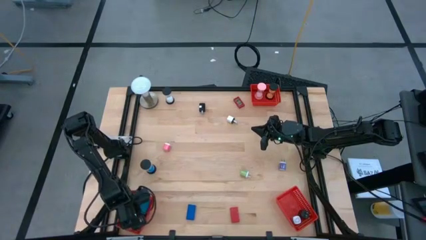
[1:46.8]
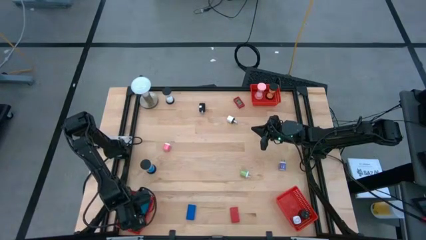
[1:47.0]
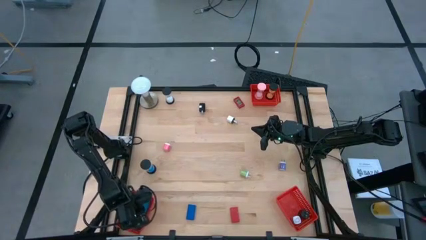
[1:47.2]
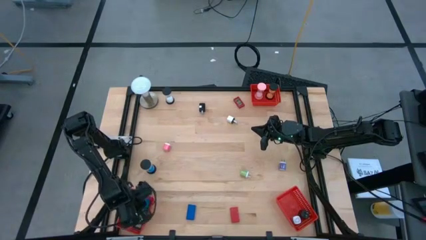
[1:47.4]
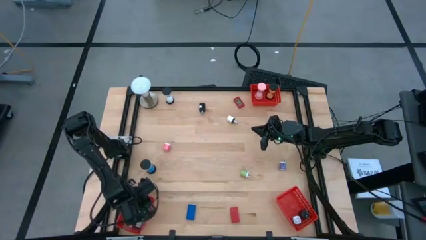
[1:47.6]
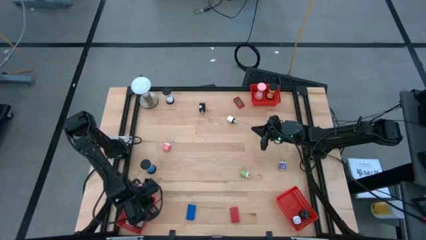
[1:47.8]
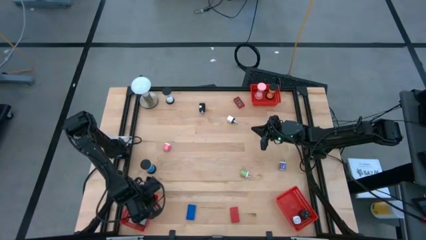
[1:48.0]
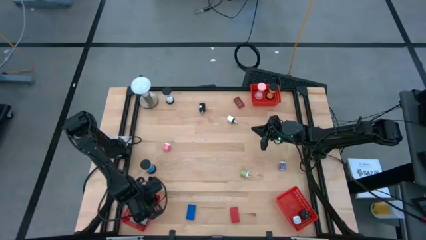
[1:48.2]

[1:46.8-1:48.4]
Task: Pick & Place Office items
Adjust the bottom left red basket

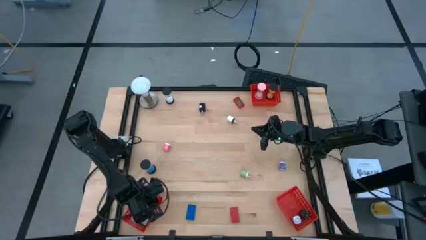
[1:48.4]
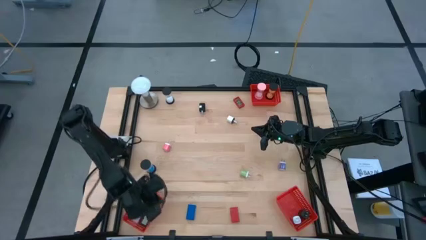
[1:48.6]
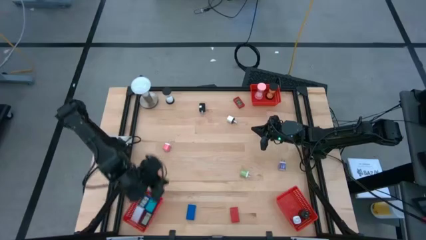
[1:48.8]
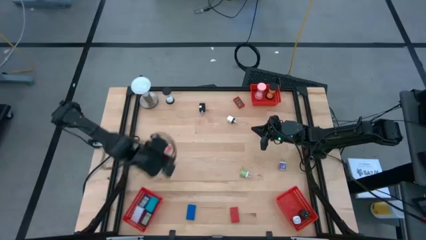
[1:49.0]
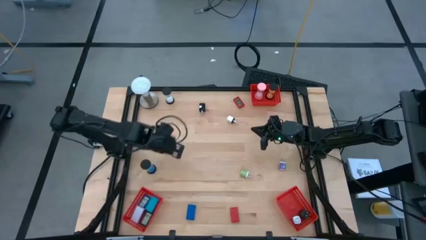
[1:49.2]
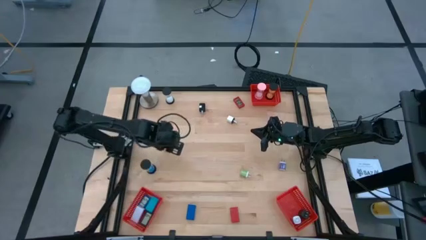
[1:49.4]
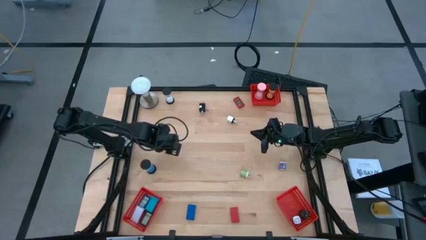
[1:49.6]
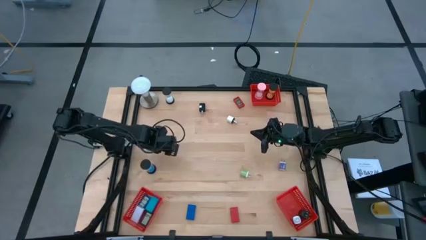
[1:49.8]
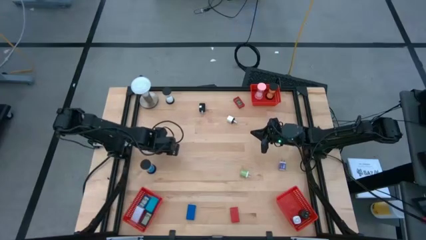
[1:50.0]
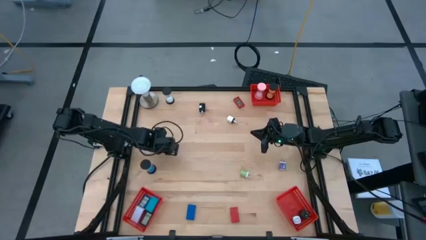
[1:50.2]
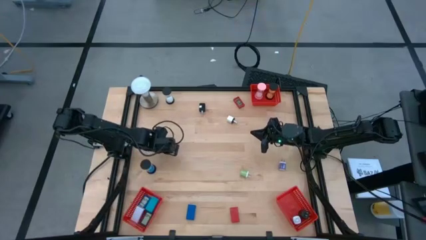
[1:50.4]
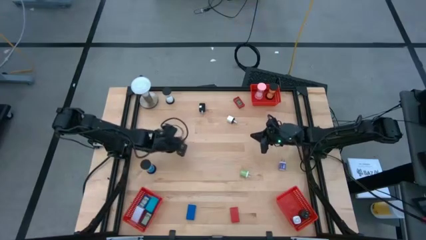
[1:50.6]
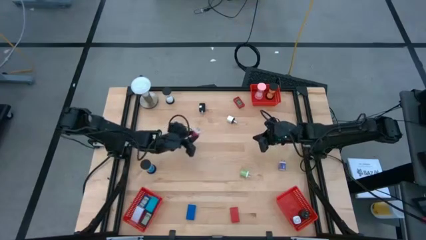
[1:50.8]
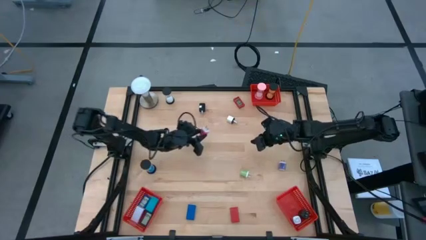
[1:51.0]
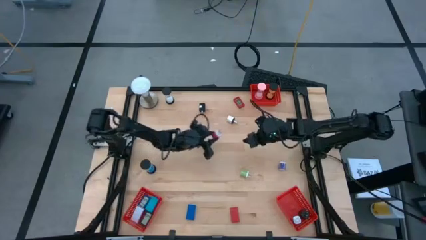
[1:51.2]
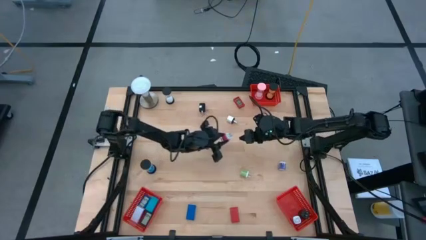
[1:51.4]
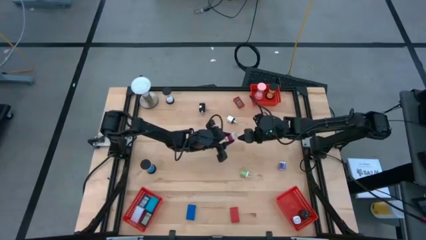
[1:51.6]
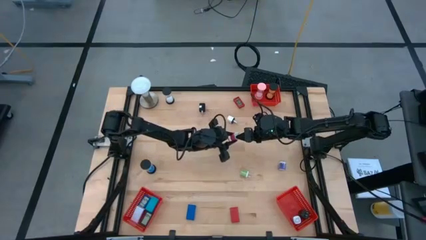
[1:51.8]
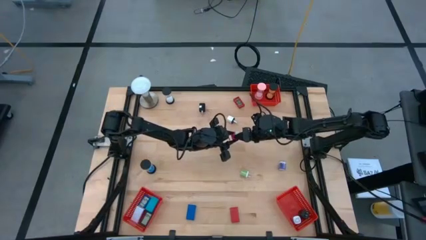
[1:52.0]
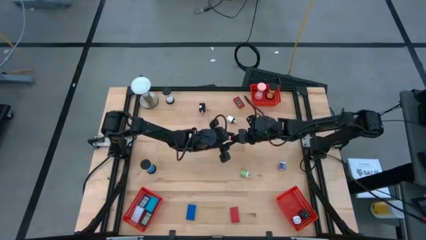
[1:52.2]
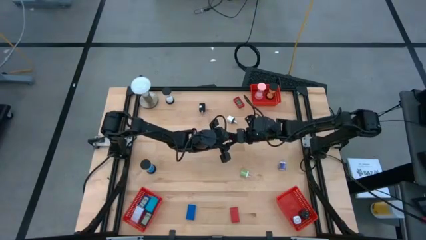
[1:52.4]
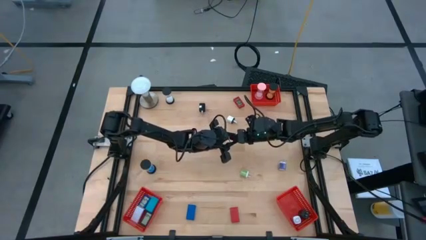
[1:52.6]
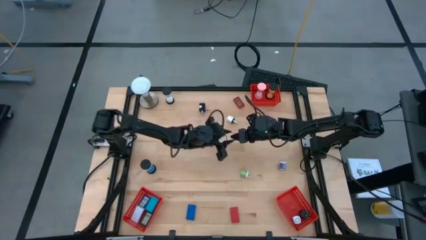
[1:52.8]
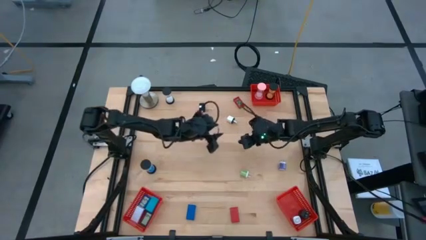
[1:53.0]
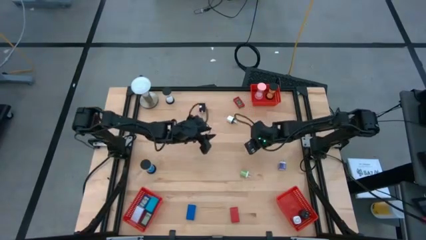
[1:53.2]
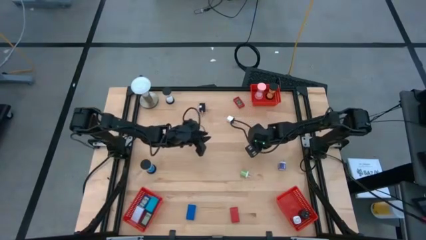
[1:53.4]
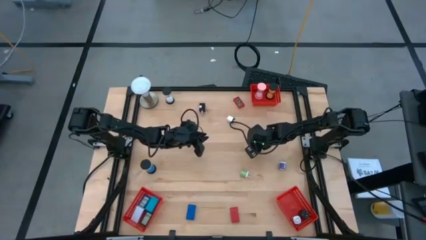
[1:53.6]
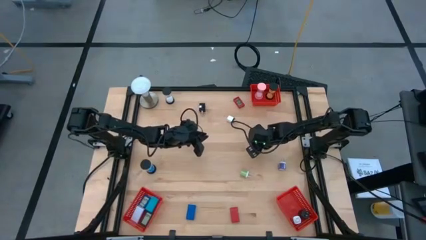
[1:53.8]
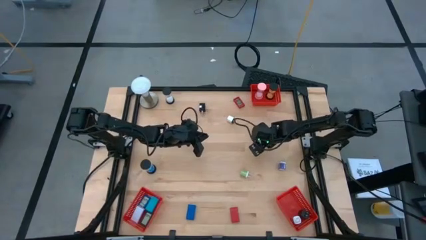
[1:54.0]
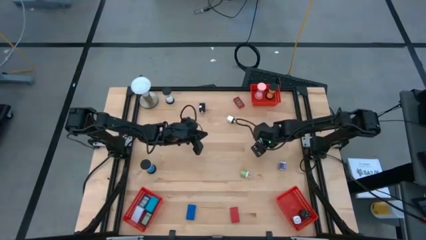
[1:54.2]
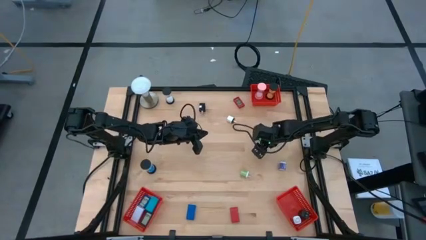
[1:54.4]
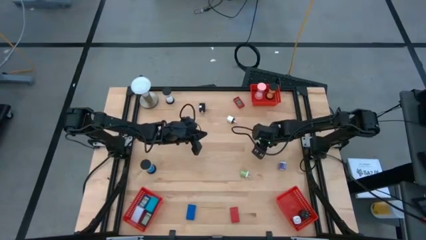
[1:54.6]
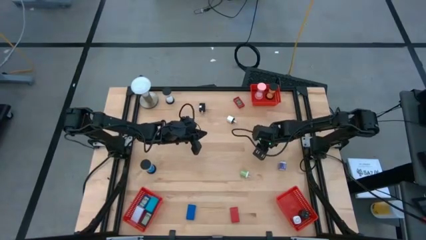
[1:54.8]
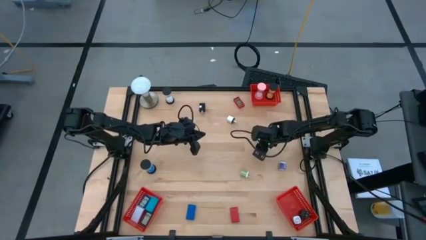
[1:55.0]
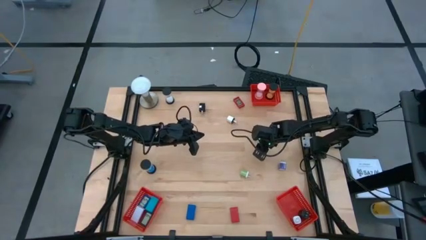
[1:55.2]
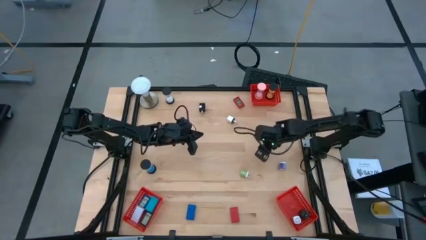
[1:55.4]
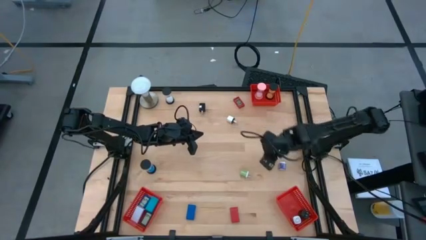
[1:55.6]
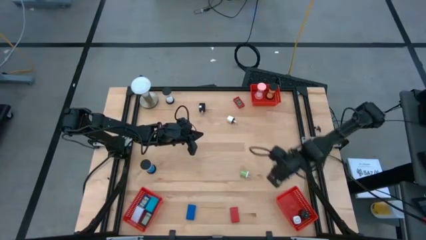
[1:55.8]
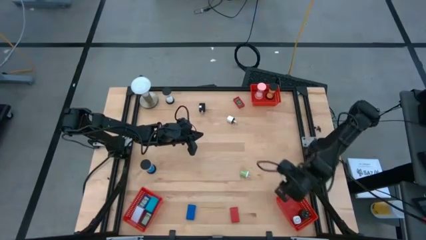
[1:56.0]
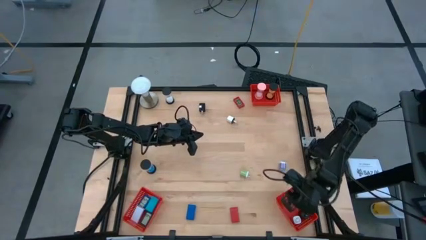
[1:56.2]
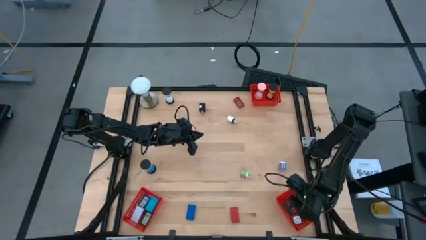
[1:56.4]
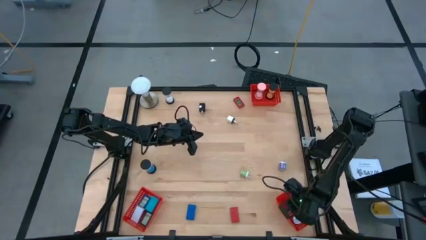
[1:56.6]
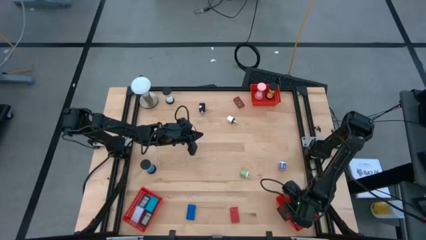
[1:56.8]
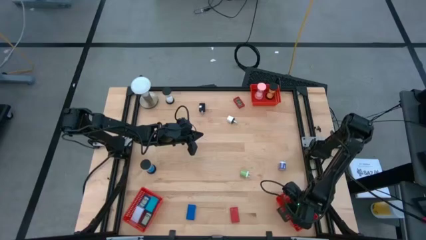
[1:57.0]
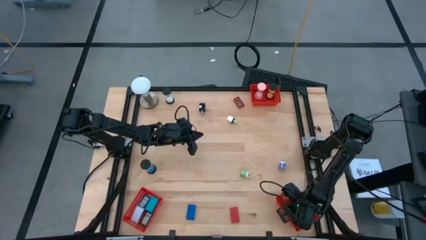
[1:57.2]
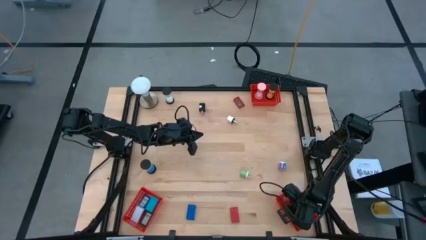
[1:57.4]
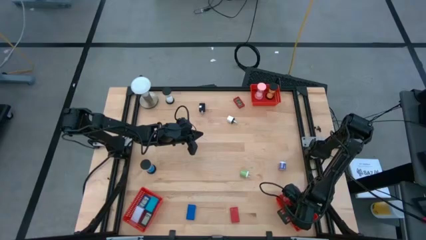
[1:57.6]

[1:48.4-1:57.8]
Put the pink charger adapter into the bottom right red basket

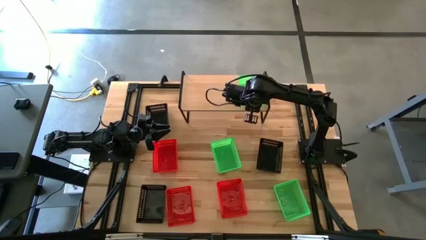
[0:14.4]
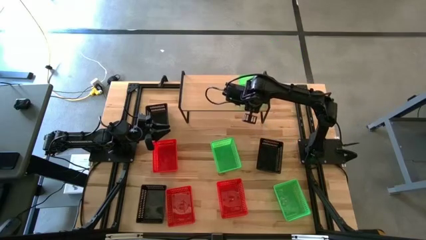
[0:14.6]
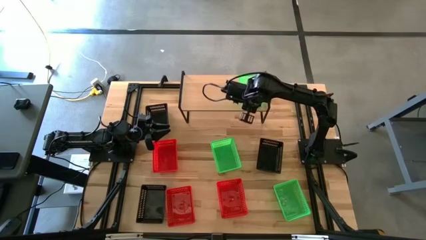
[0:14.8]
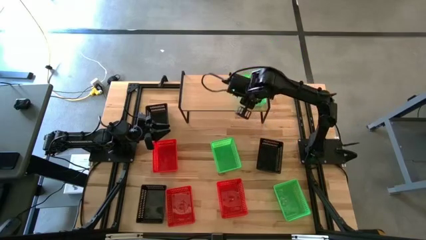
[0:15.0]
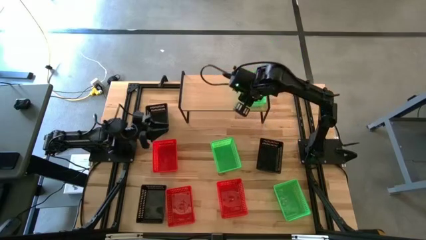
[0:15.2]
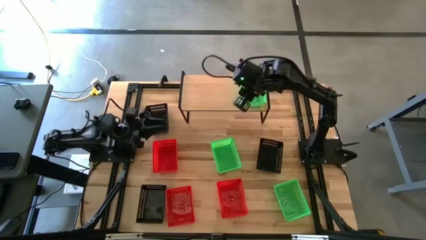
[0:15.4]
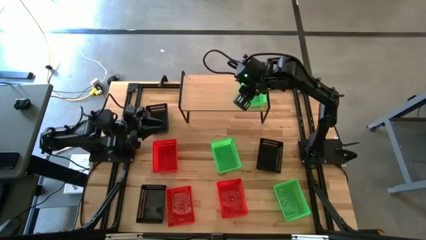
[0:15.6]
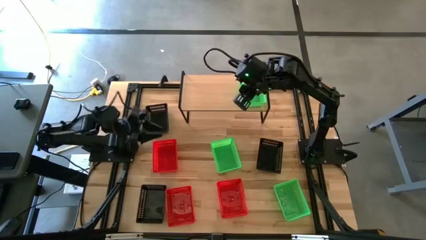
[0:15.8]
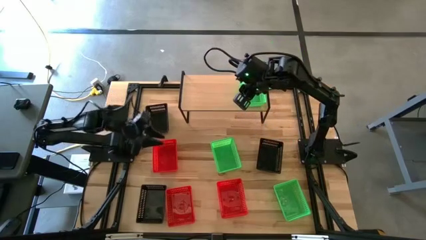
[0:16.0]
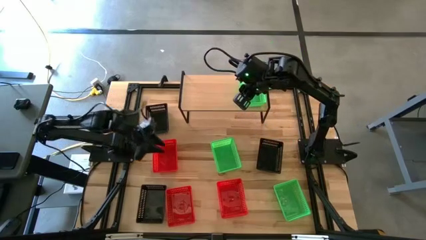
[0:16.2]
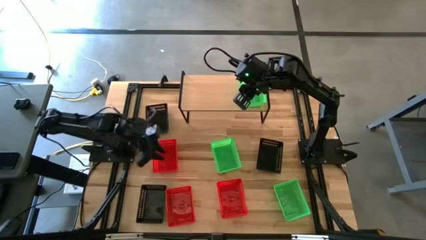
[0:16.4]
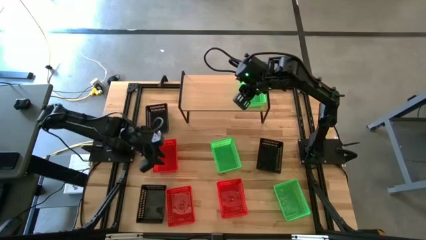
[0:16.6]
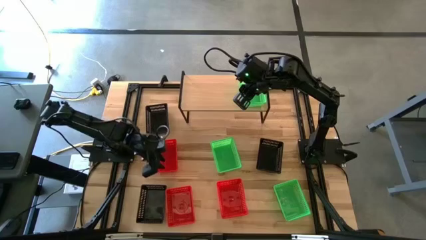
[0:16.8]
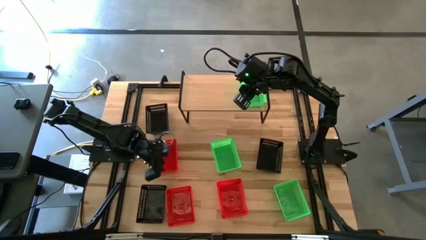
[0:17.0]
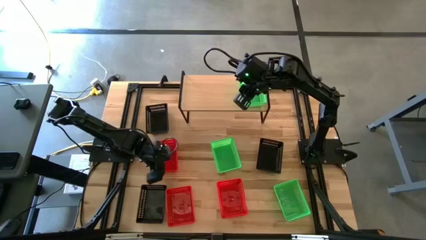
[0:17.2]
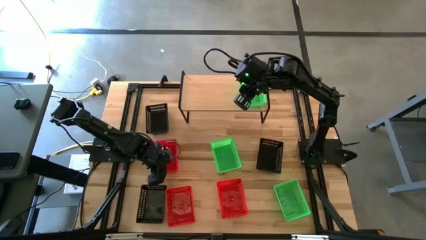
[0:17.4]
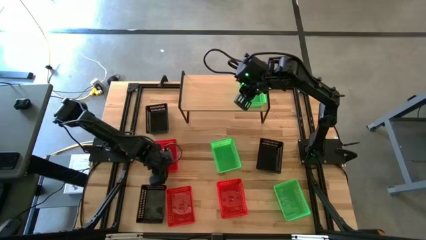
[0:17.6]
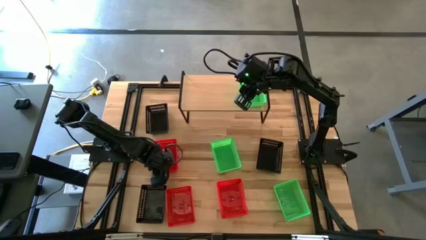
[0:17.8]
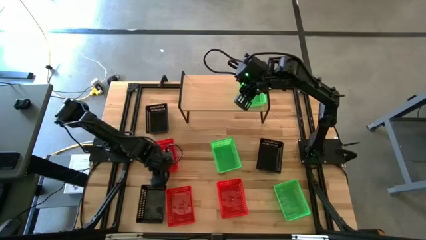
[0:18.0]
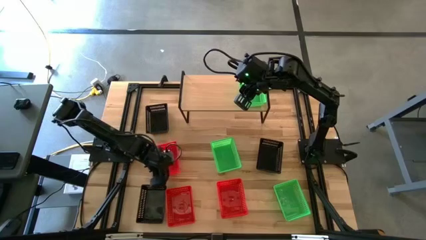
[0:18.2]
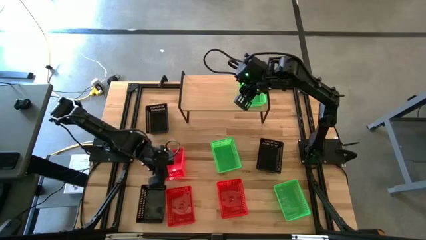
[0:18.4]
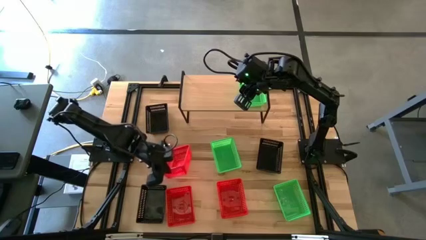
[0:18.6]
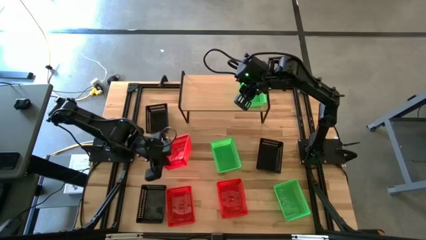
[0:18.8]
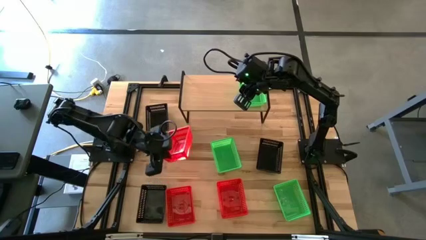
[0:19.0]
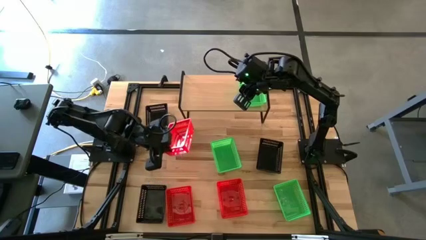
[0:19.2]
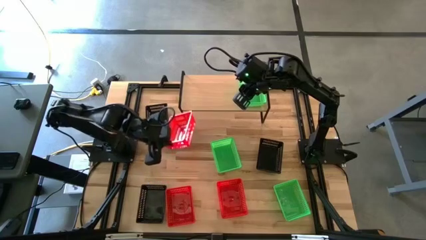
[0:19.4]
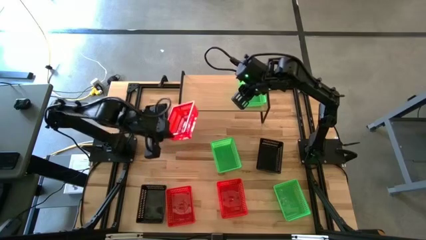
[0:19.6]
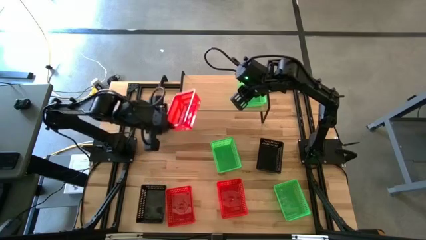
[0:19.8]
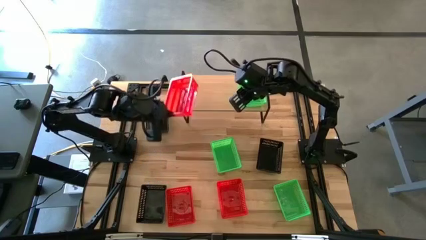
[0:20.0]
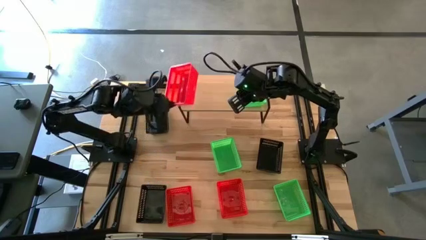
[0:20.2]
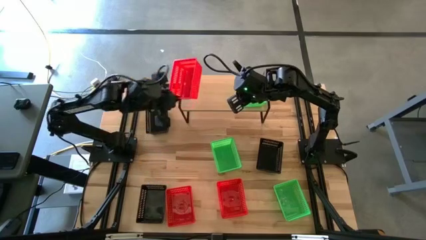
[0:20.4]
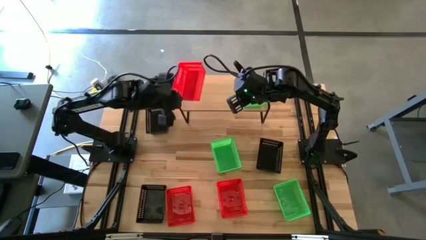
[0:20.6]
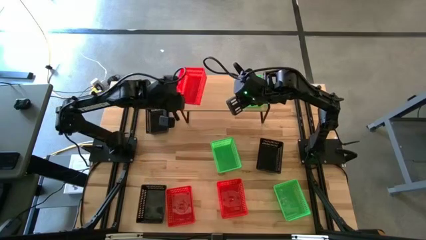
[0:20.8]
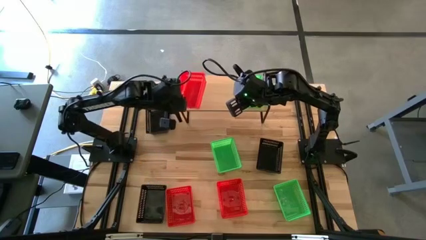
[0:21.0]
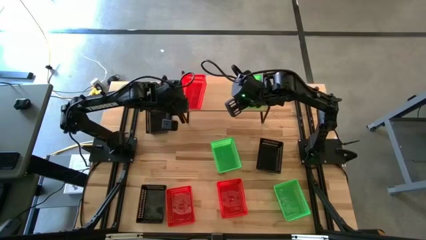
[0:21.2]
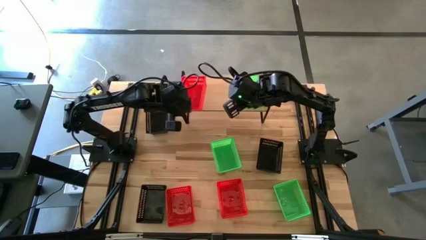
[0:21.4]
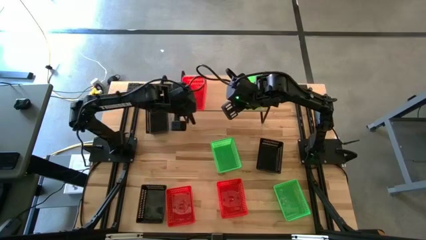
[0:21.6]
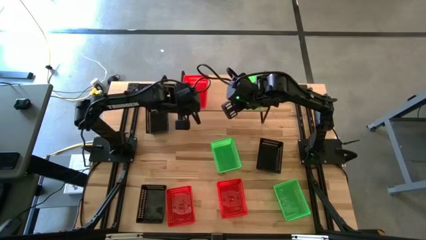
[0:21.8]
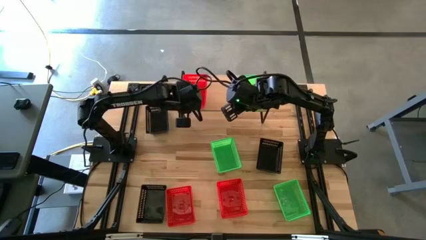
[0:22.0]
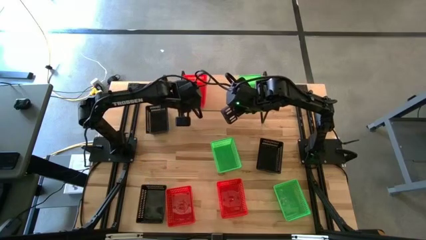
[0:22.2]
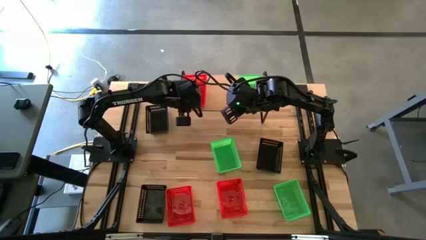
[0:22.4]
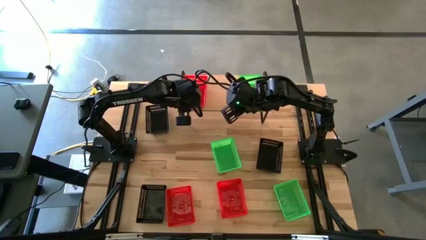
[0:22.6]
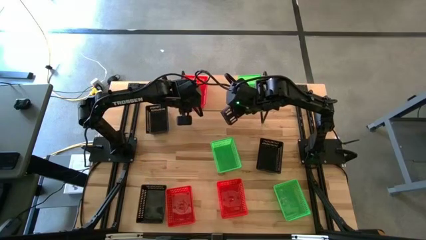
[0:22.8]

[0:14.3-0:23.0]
Task: Stack baskets on shelf by color
Put the top red bin on the shelf
